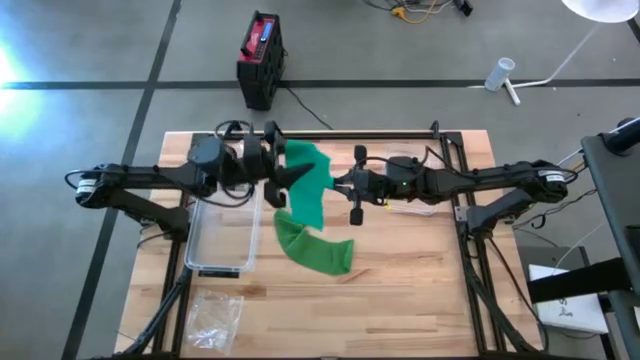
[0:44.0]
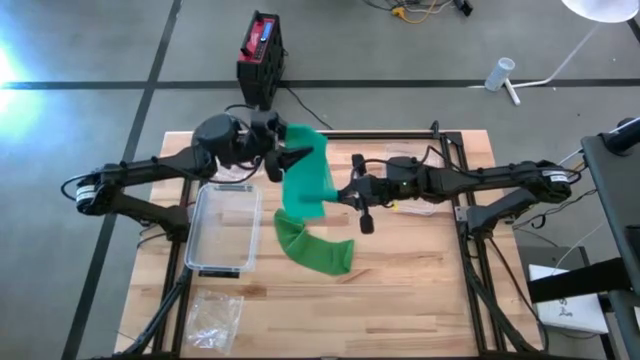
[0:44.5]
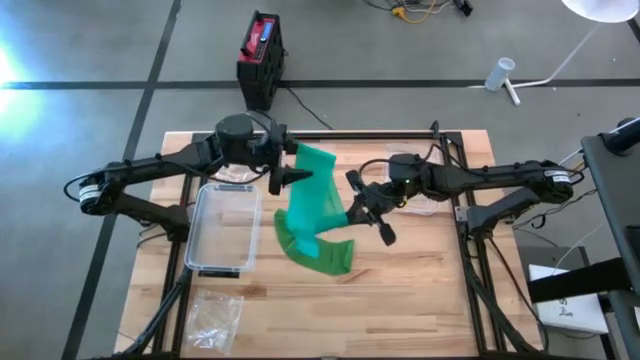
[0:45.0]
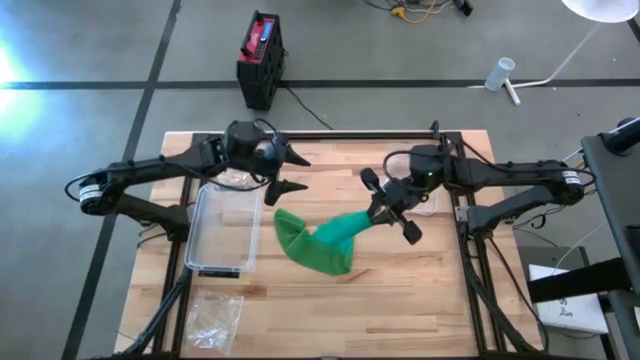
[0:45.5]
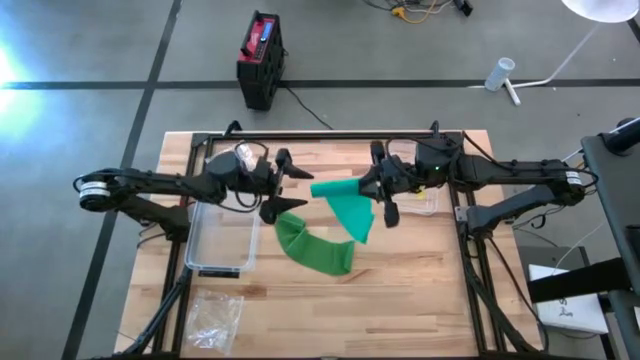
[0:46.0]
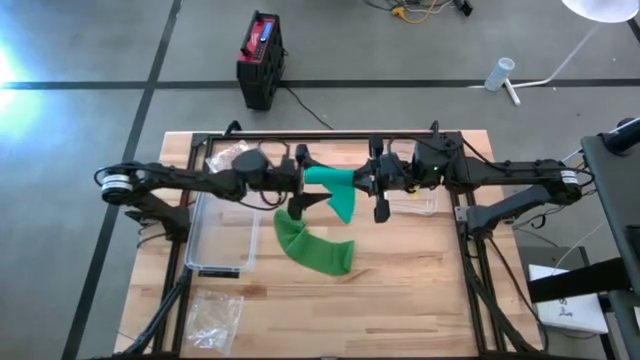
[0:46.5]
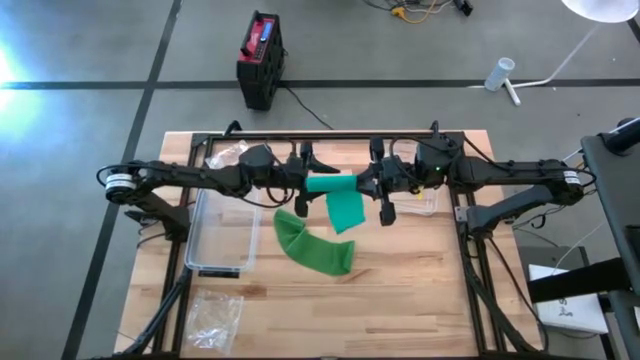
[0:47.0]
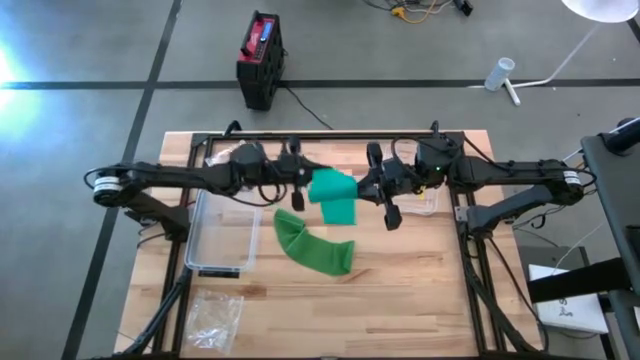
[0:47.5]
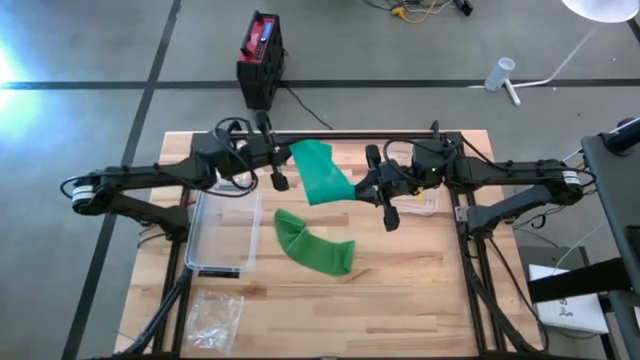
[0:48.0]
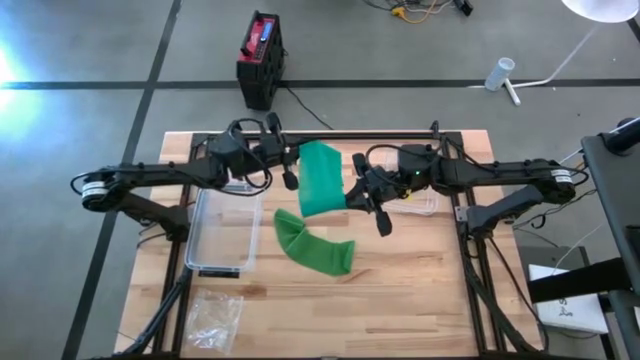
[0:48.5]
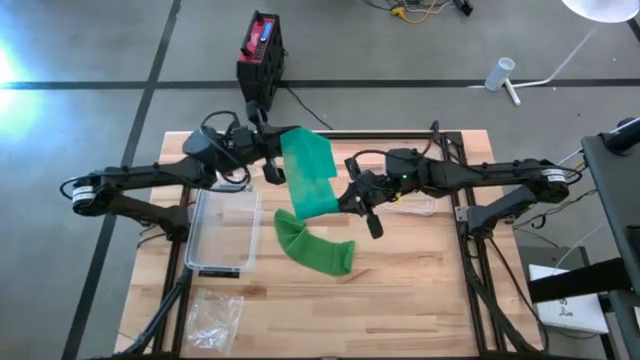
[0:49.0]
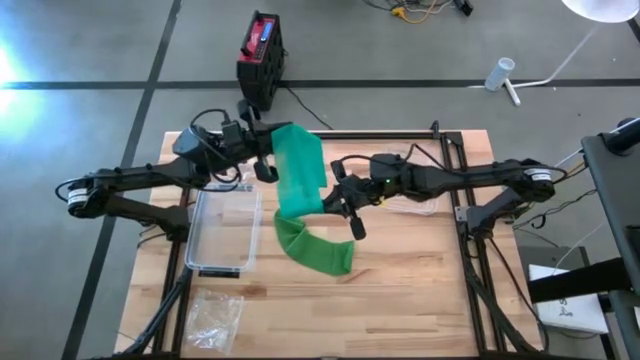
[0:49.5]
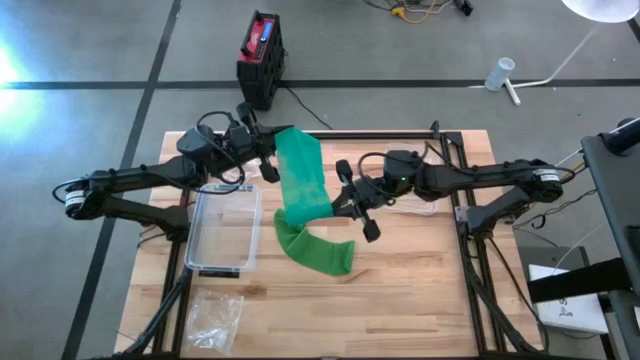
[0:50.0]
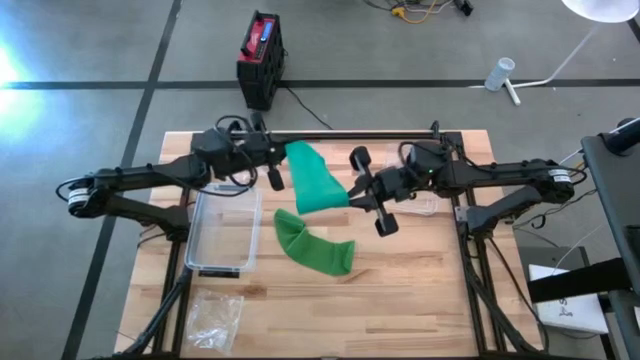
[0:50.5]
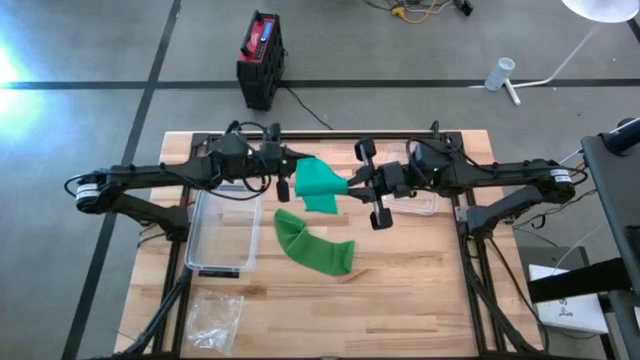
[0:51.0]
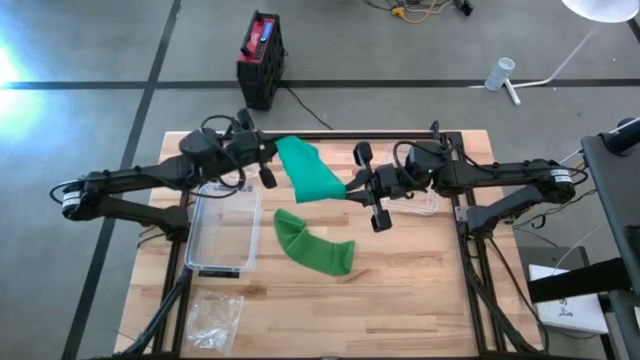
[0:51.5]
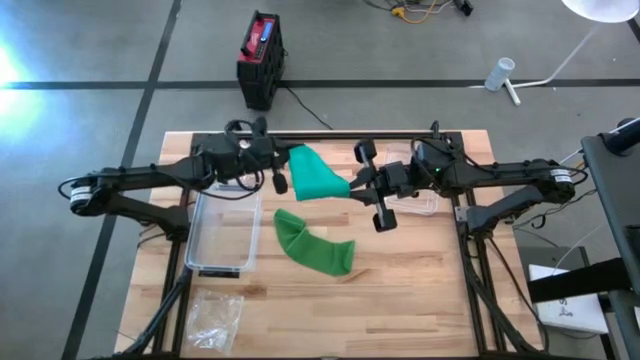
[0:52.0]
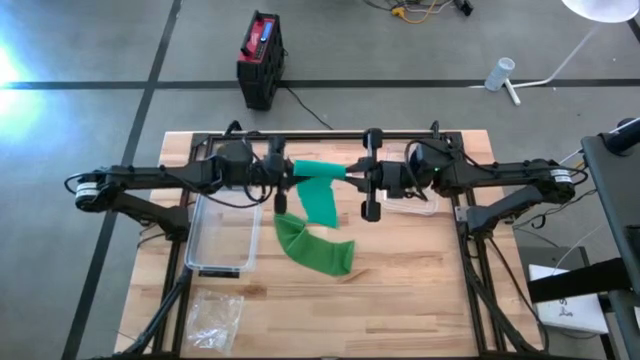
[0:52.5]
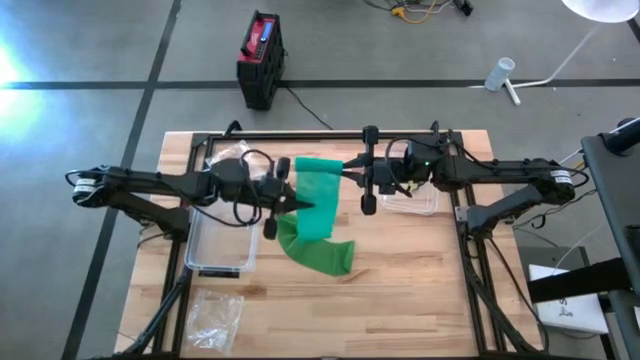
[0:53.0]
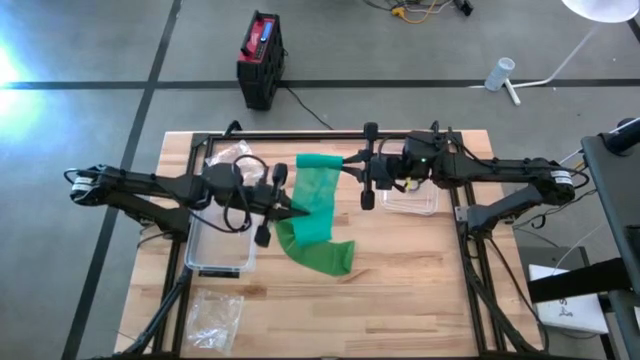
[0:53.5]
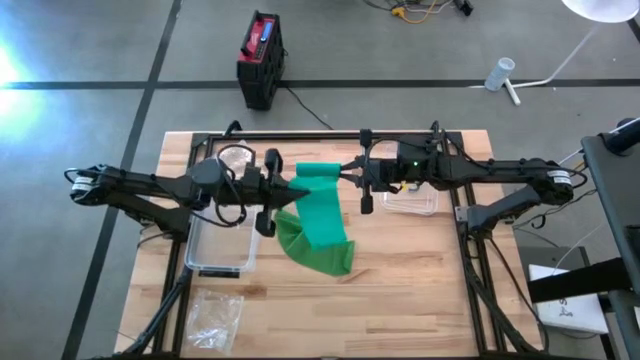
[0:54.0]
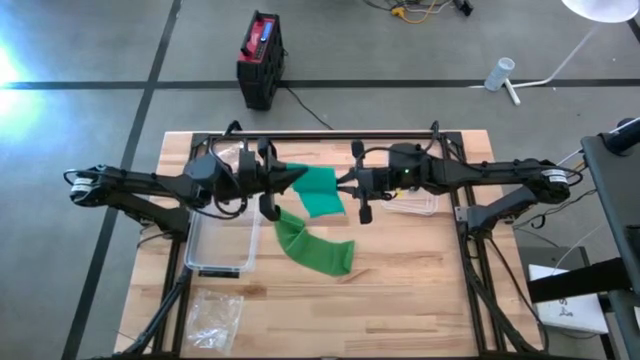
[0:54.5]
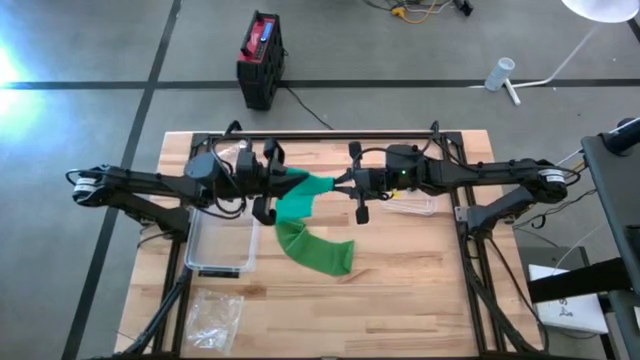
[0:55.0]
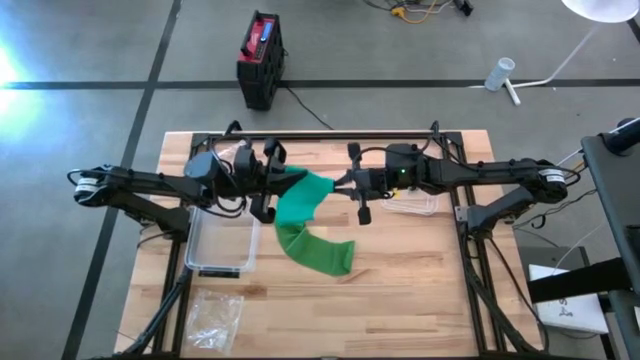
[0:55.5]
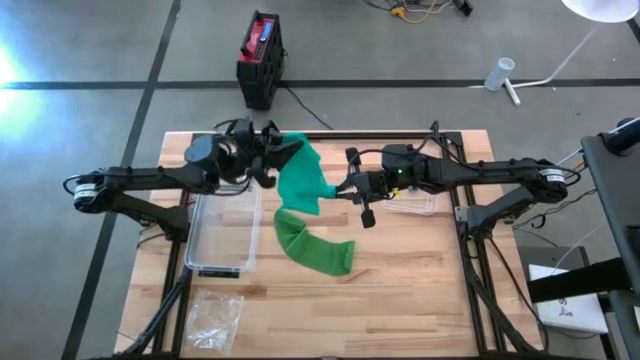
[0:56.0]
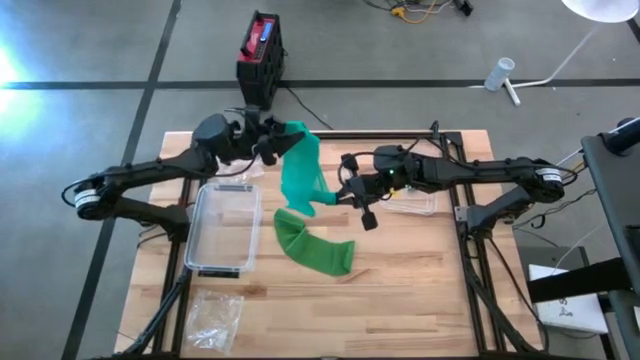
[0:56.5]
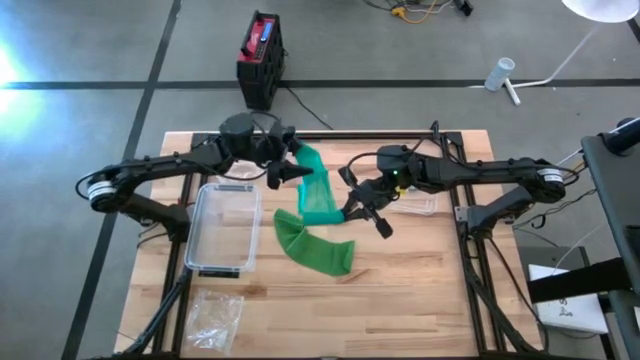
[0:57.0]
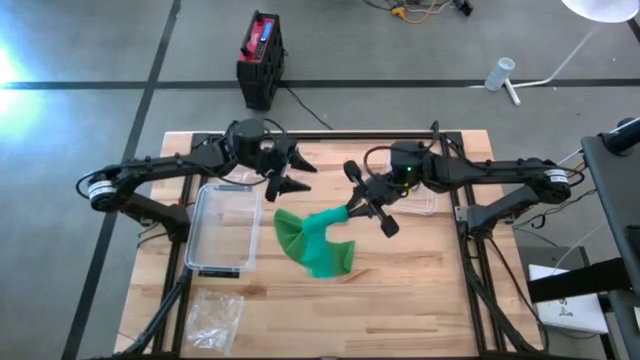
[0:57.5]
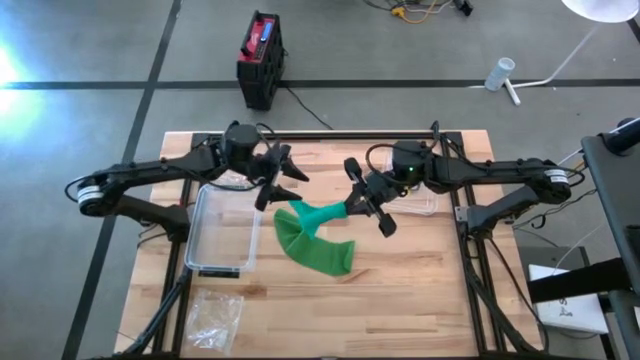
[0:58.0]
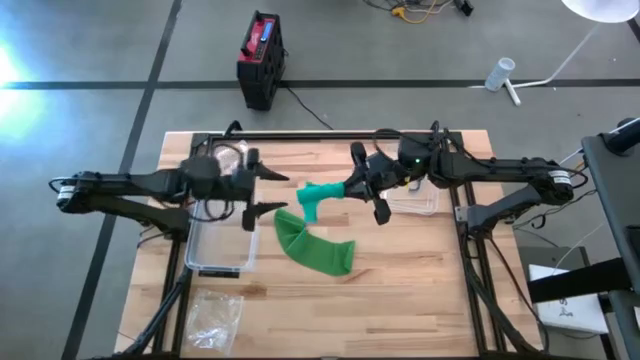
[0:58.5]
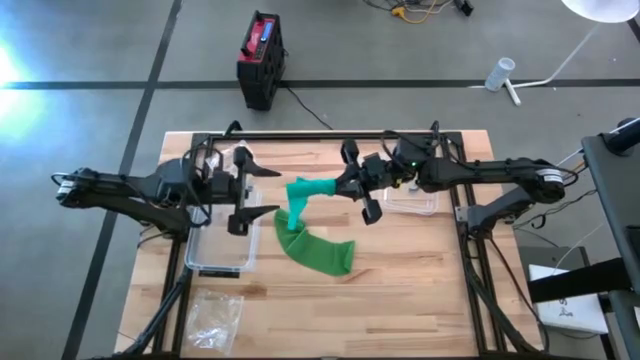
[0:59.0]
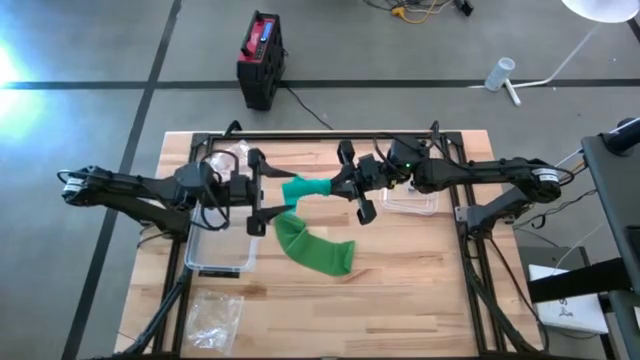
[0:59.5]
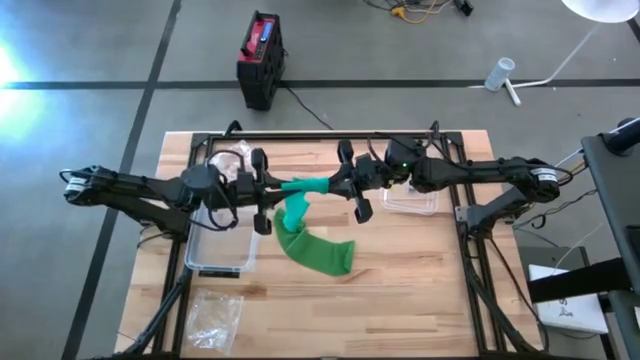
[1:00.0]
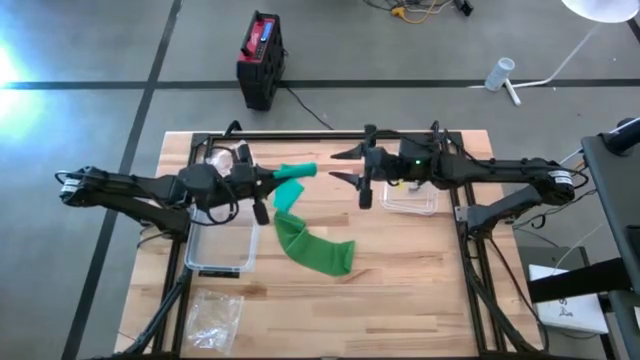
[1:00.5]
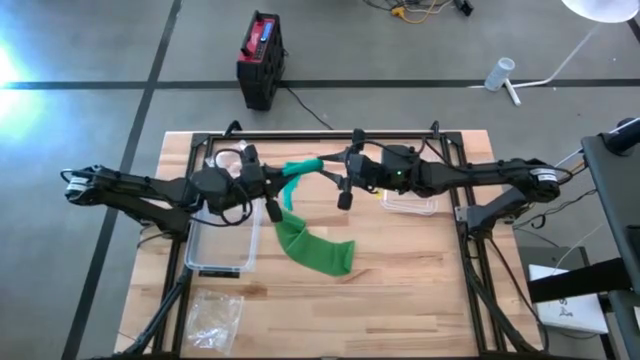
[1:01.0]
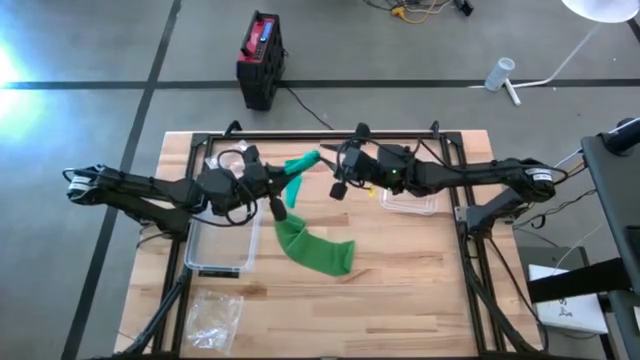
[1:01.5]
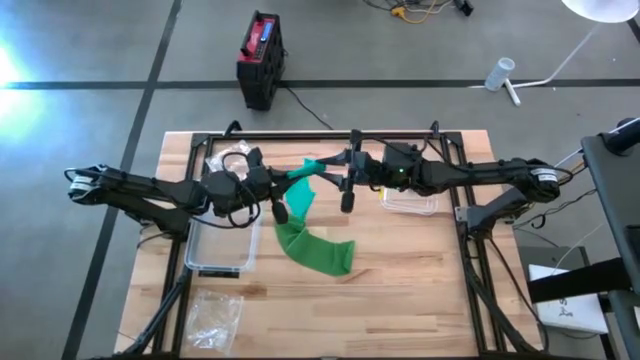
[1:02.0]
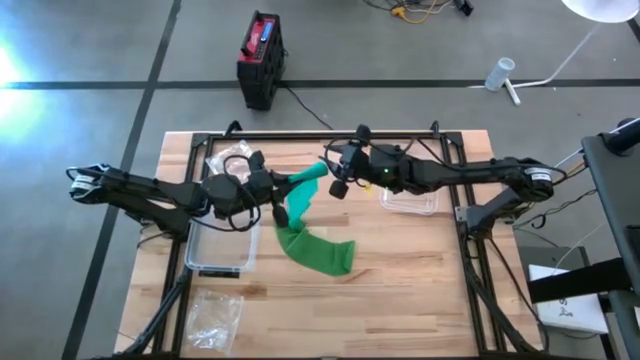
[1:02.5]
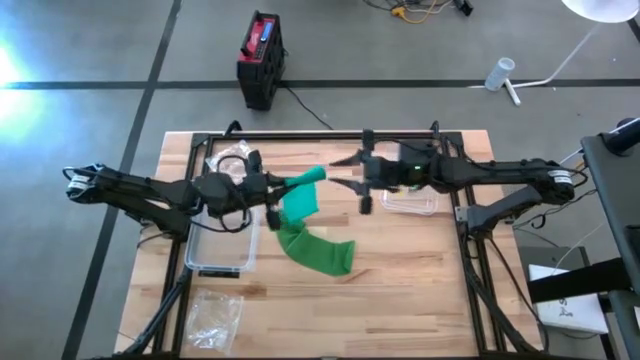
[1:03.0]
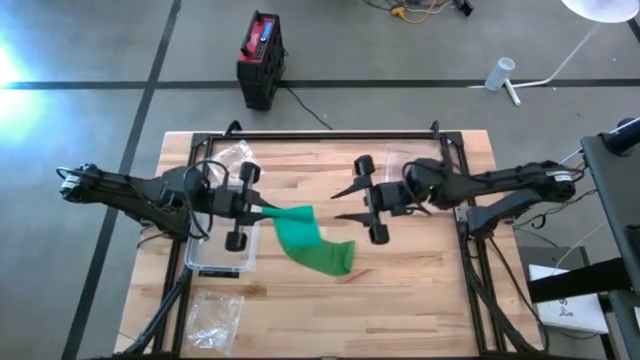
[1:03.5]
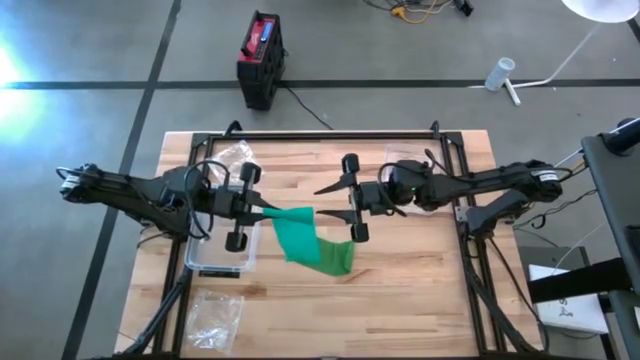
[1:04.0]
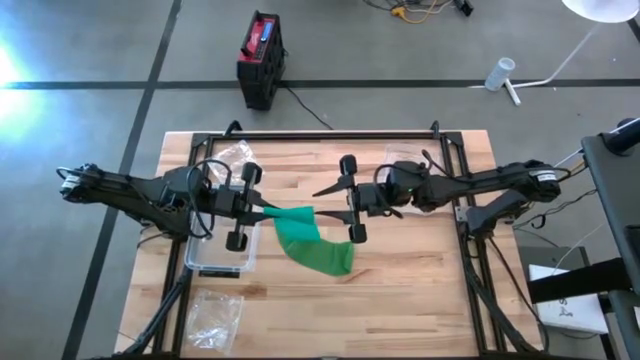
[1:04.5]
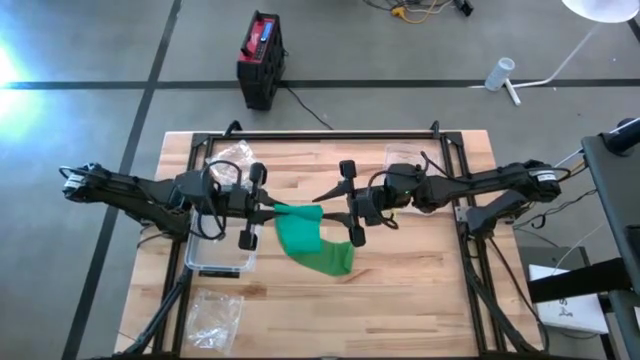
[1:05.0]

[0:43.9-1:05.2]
Task: Roll bandage
Roll the light green bandage
